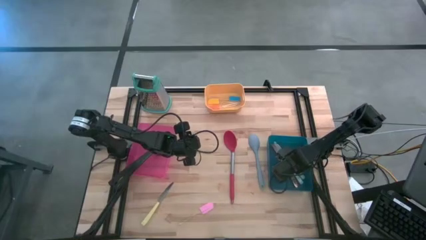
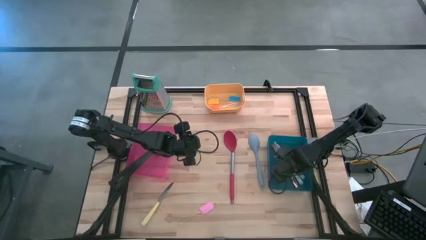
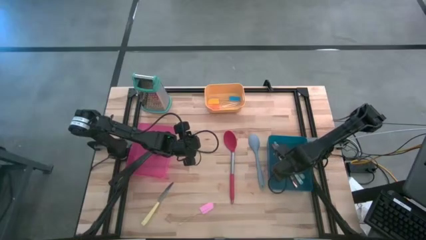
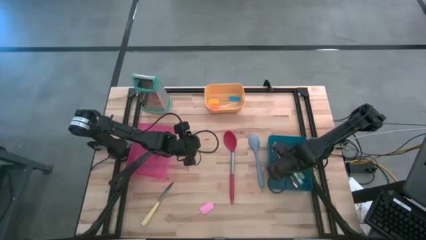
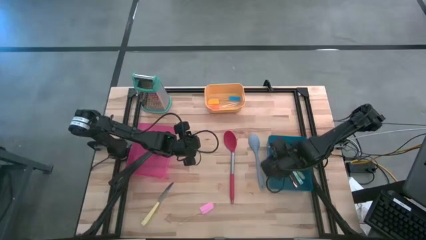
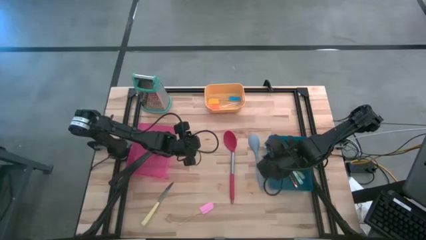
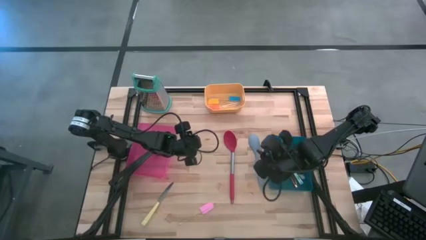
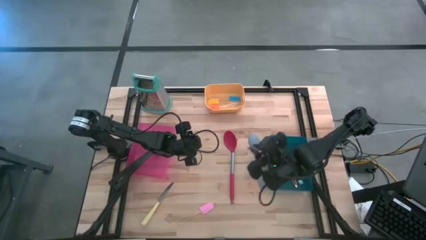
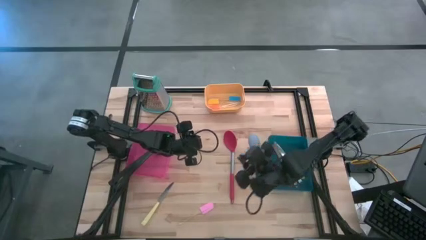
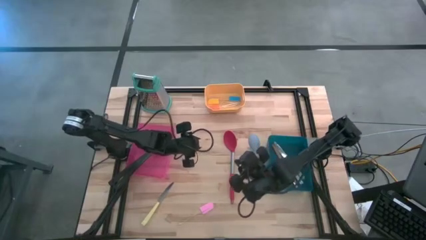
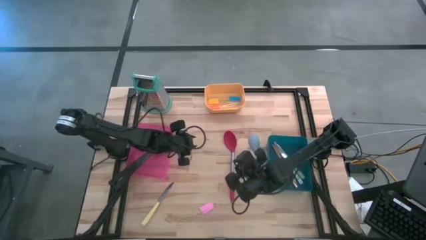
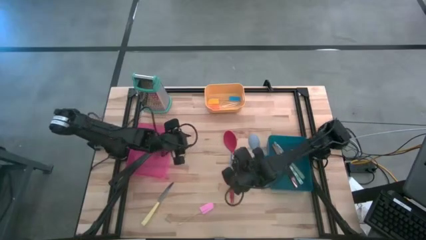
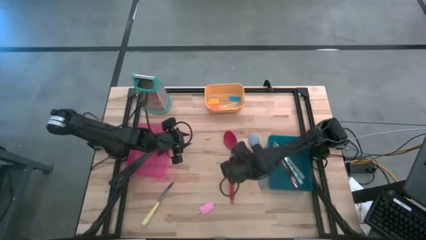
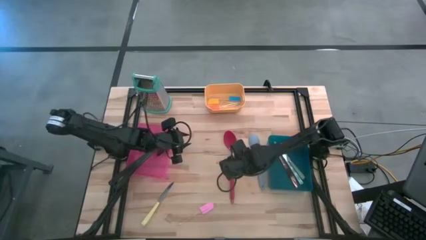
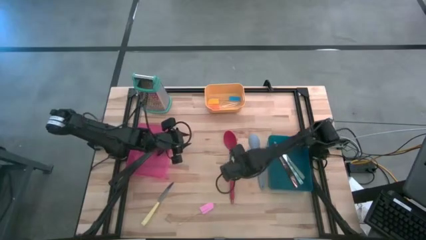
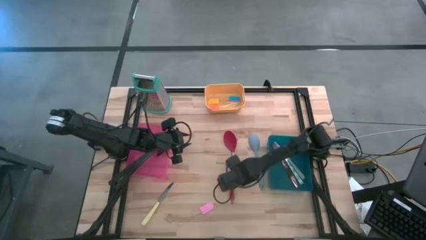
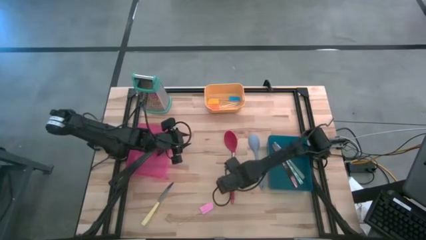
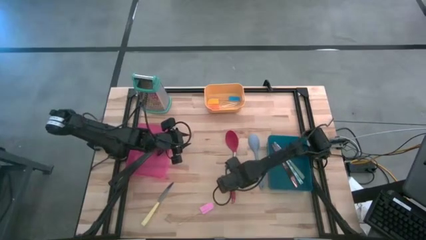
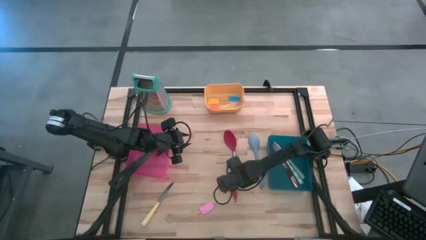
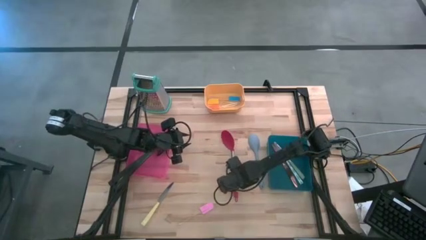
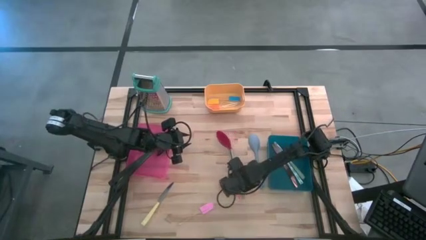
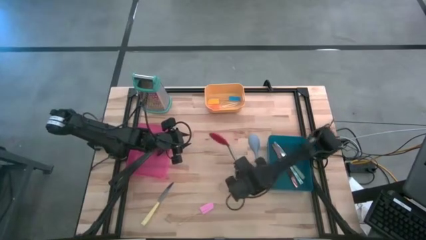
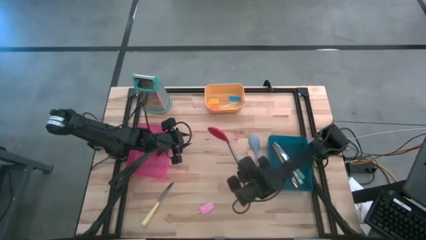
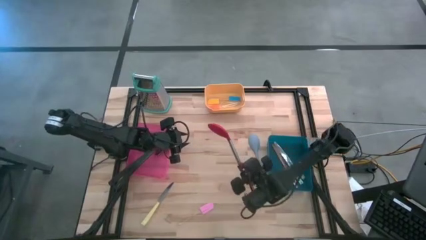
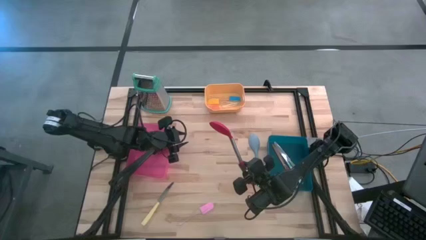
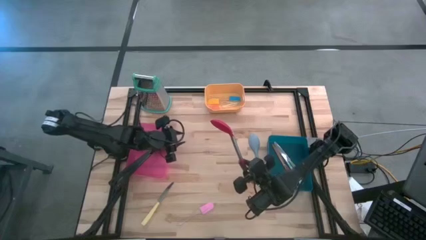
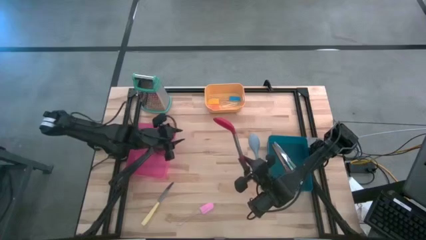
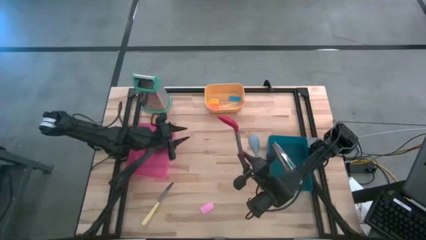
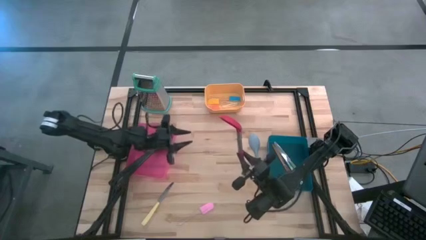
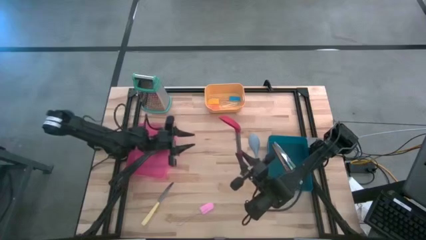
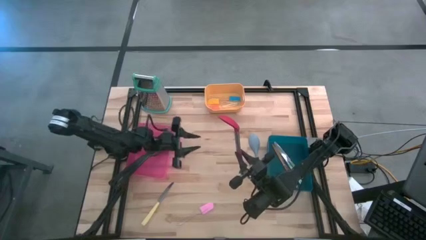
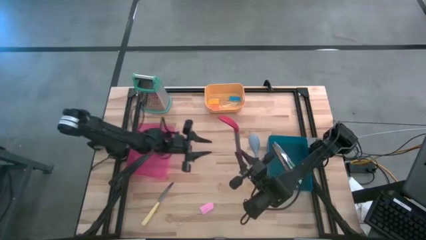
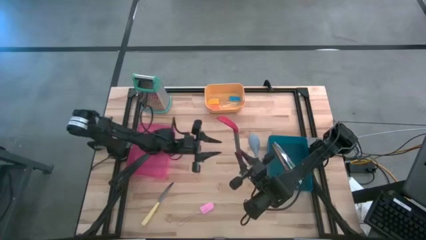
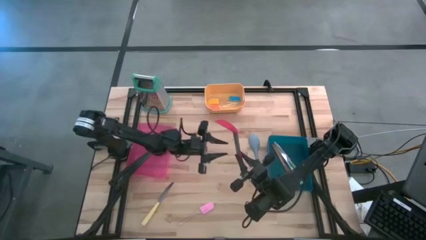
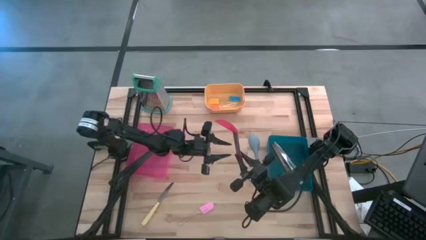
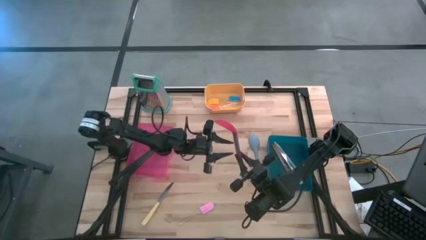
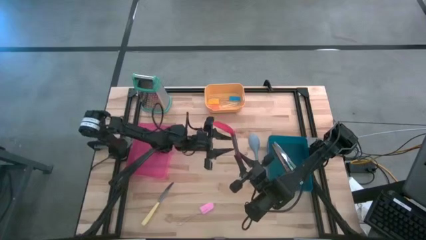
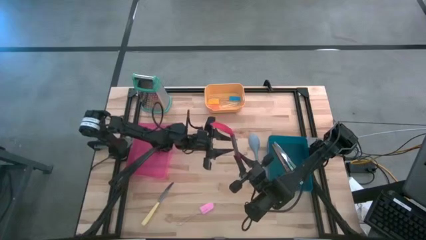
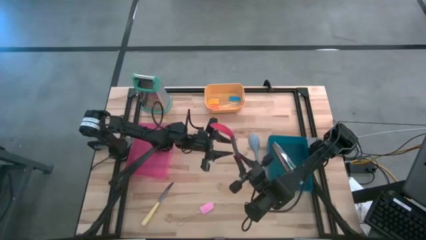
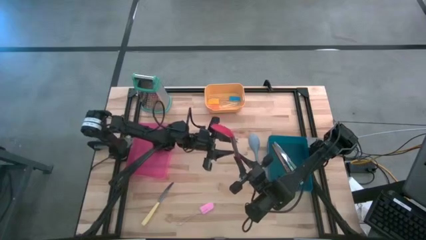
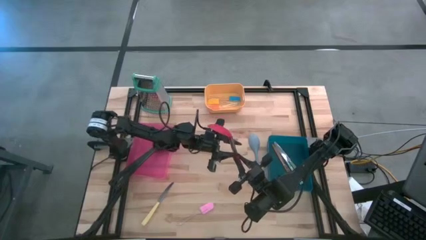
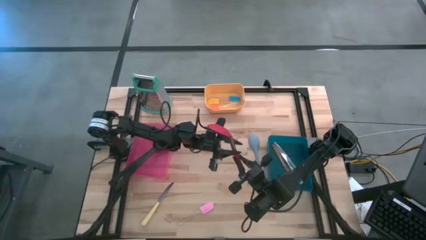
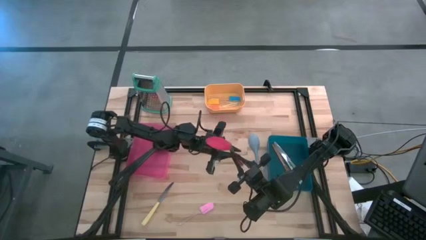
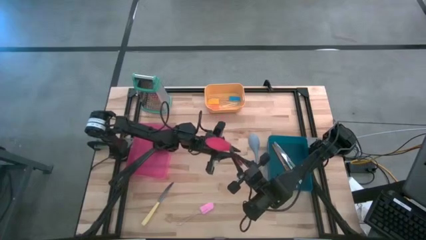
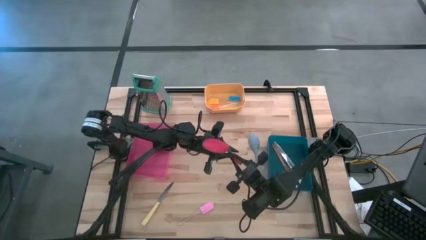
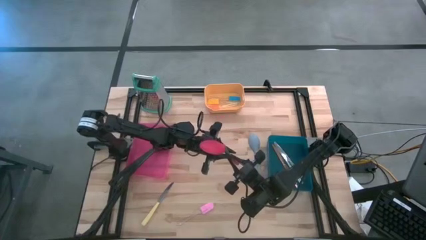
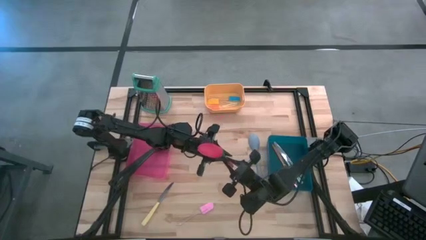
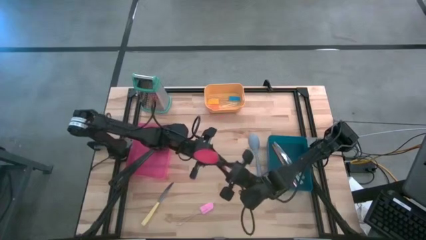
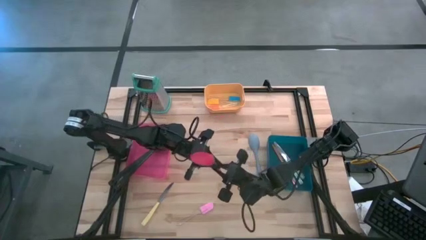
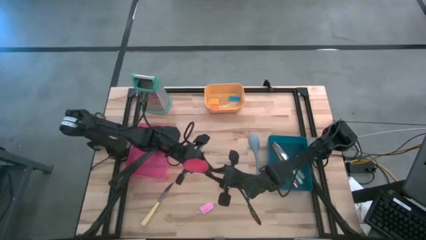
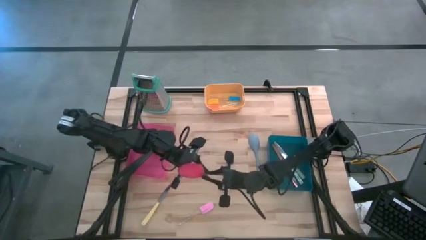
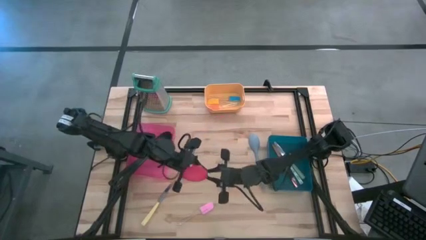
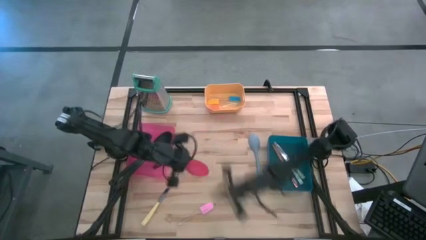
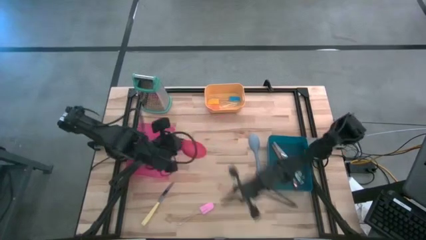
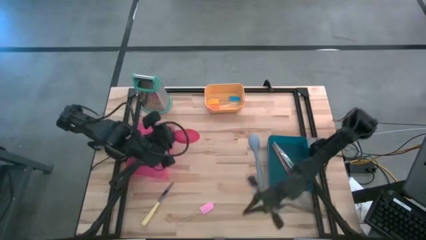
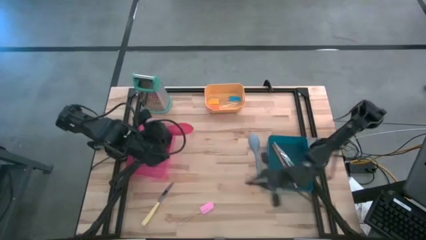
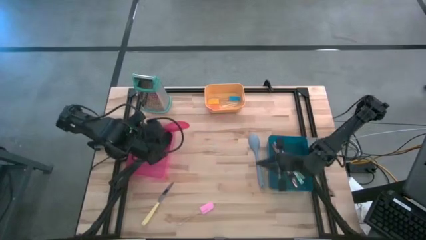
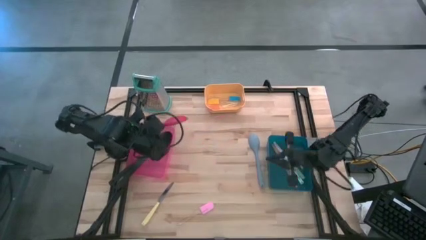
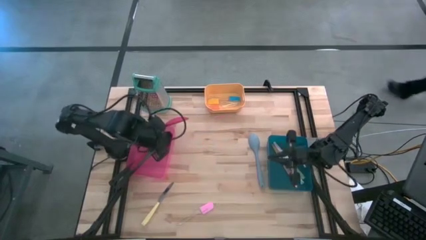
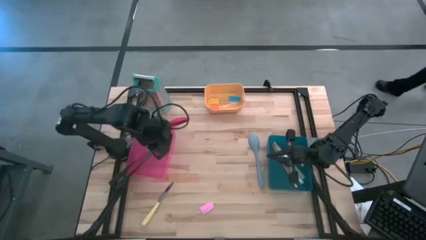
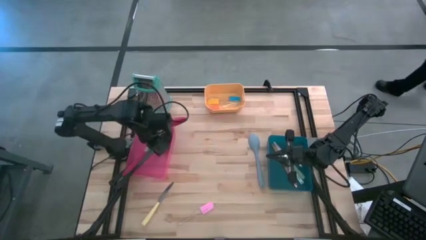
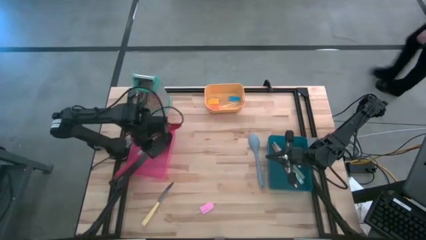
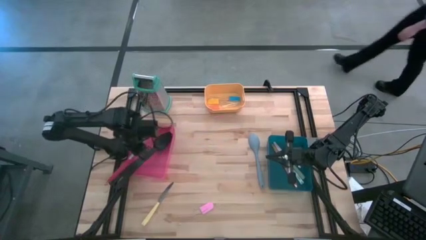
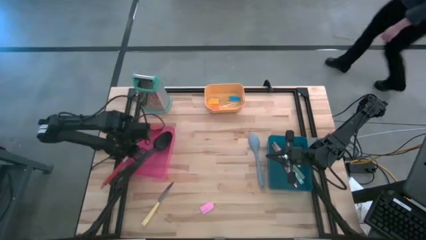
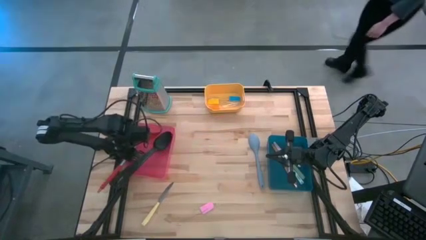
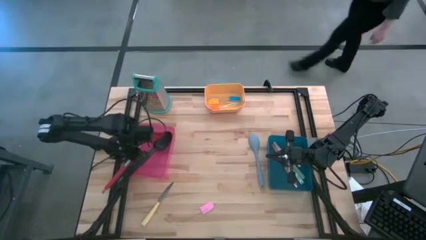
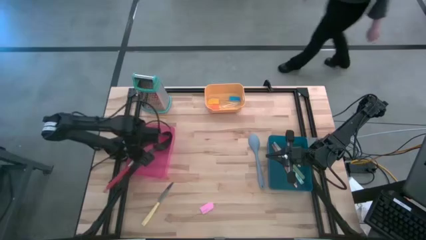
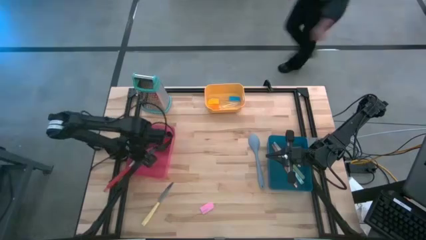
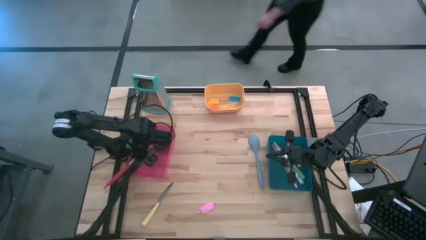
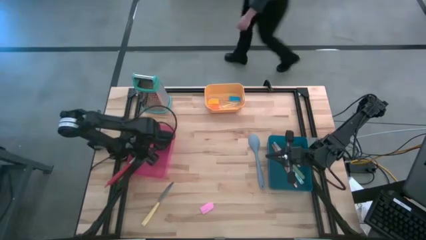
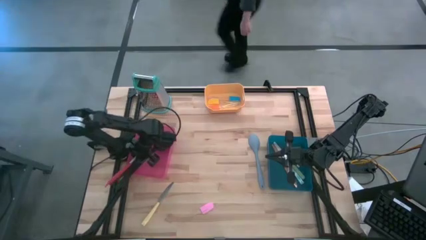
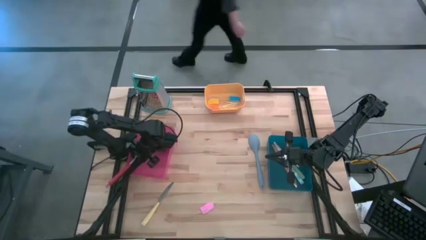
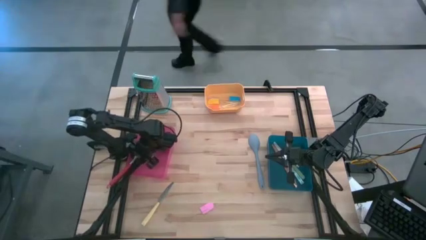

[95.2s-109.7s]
Task: Pick & Place Kitchen Items
Put the red serving spoon into the pink bin

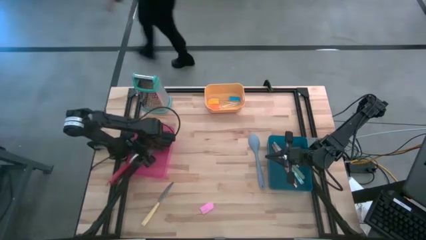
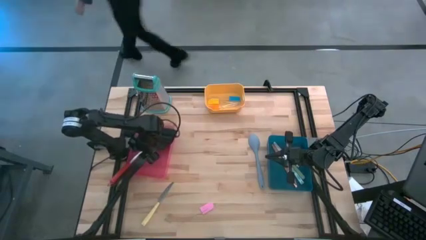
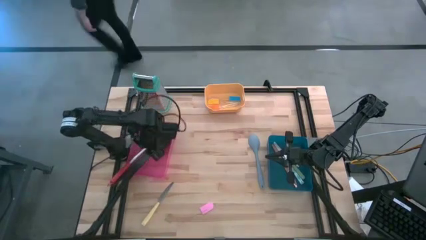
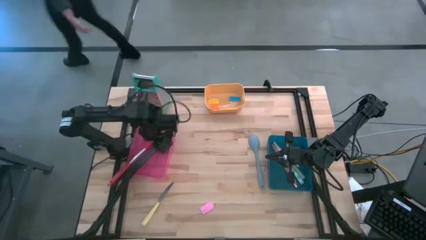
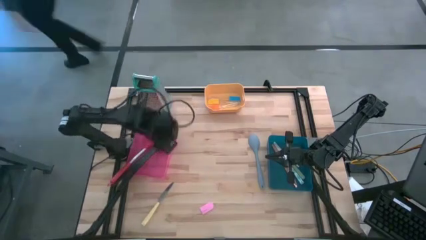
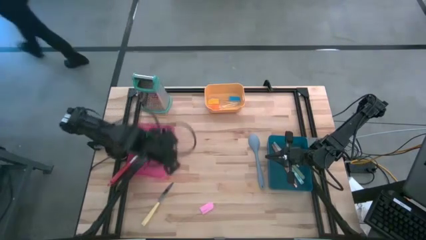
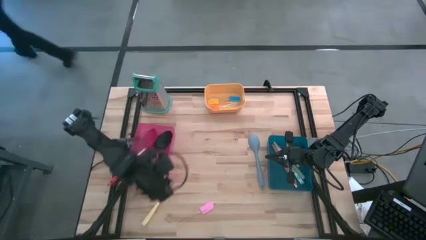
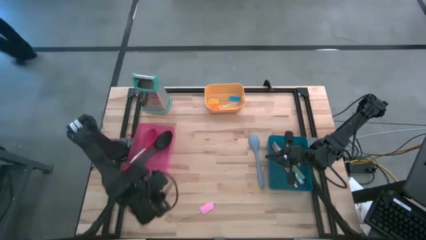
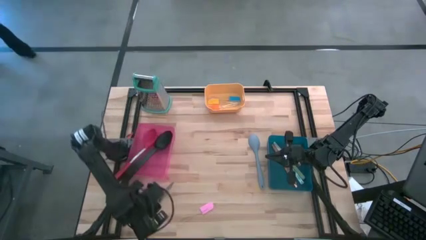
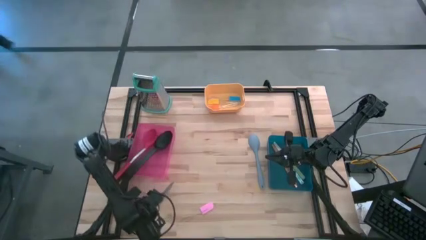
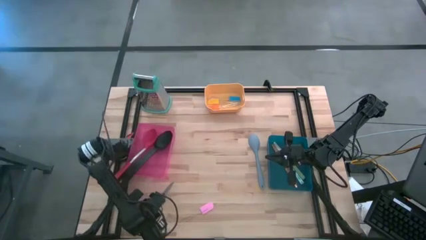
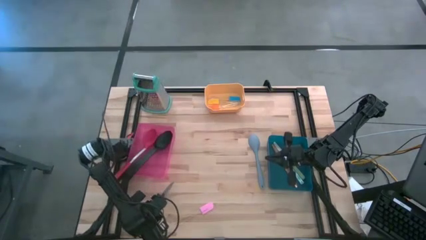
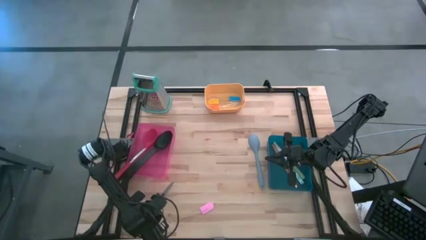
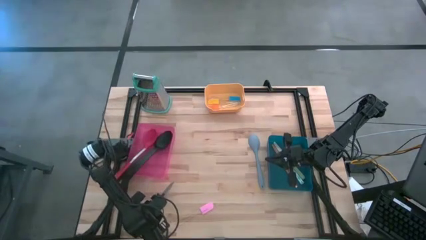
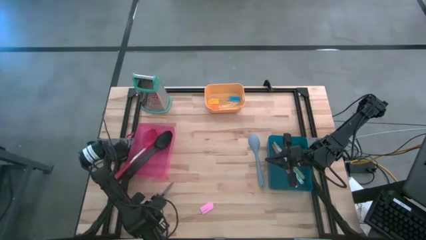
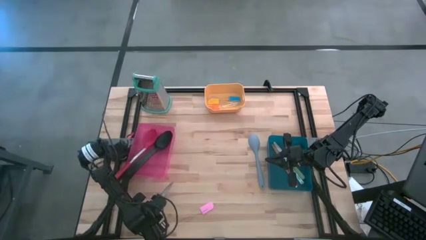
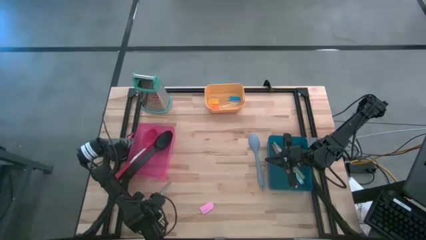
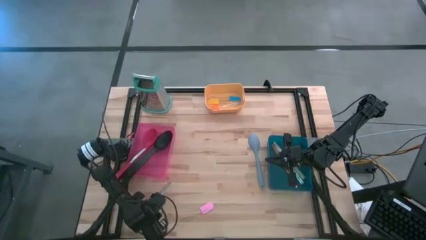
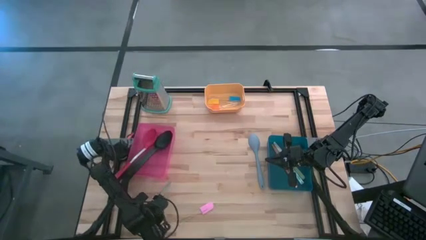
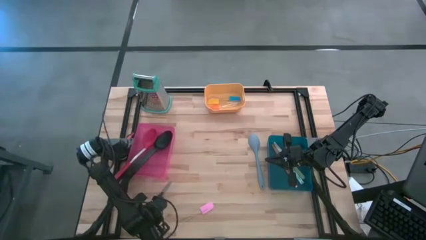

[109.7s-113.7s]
Put the yellow knife into the blue bin
